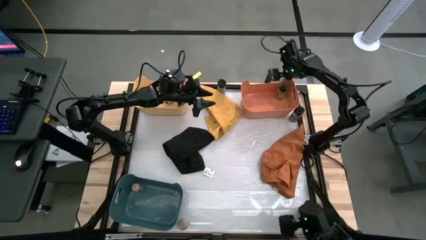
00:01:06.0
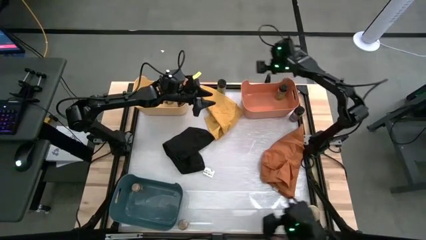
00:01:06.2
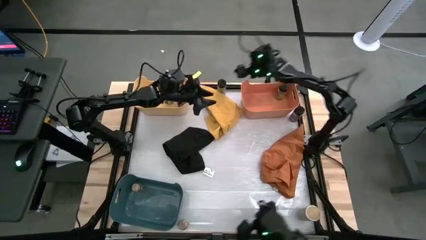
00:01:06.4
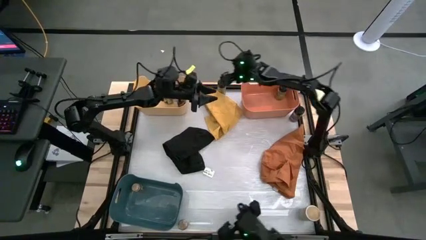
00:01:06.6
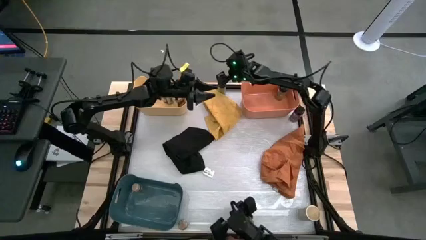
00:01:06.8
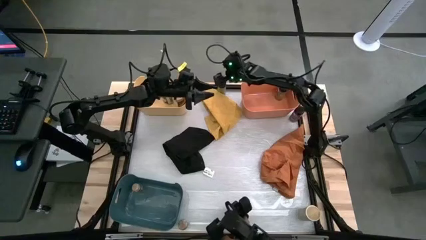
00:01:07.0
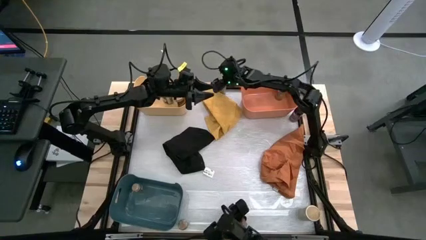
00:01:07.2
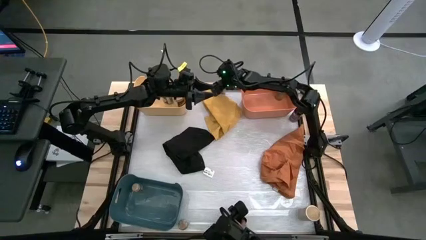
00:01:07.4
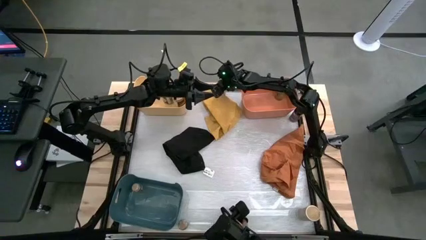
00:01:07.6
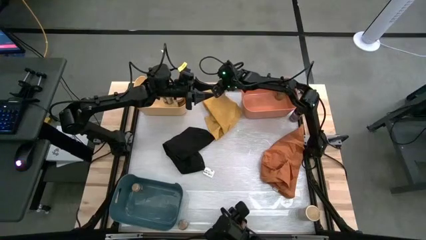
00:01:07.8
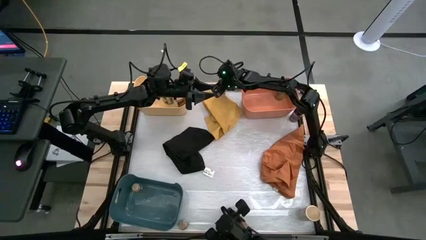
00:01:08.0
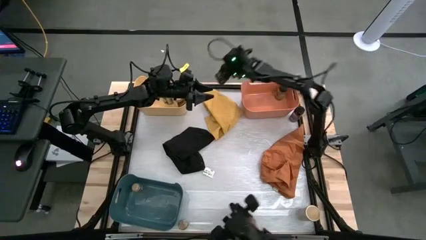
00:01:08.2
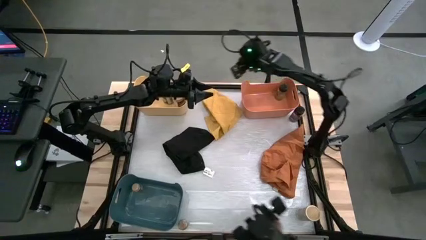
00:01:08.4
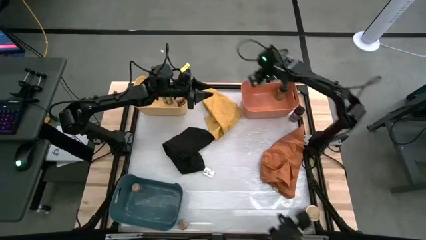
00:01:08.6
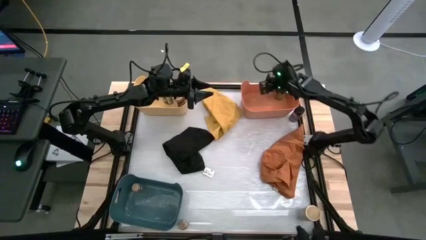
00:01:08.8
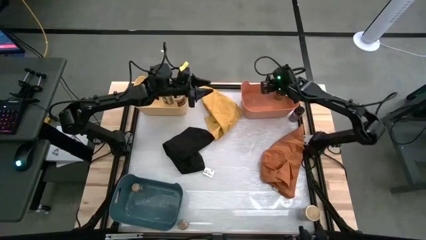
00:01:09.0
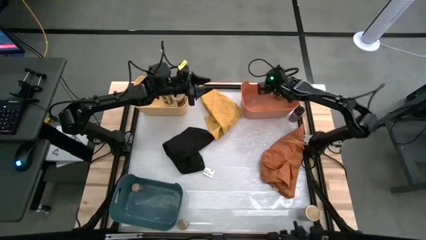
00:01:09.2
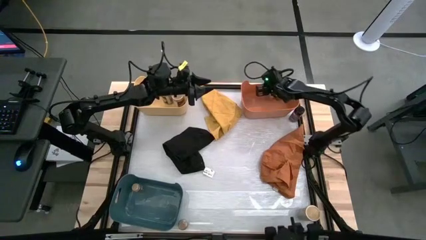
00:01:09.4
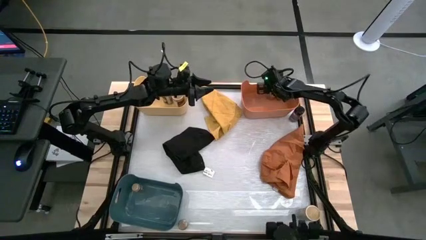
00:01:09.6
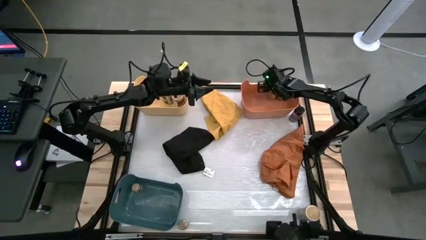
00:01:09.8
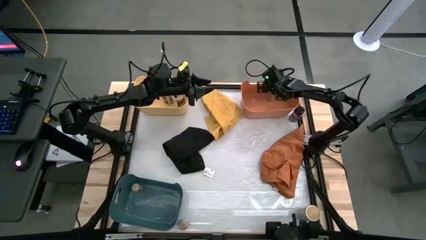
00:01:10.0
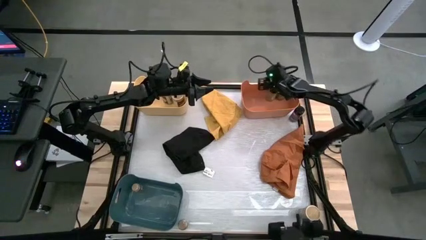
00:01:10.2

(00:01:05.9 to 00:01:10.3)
Task: Sort spices by type
Put the left black seasoning bottle into the orange bin

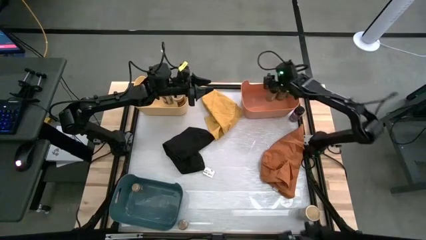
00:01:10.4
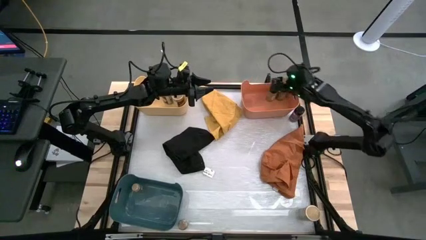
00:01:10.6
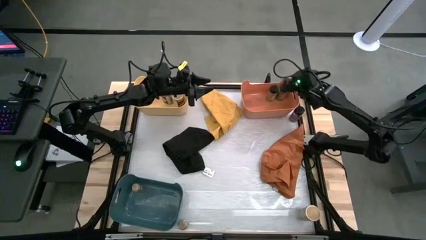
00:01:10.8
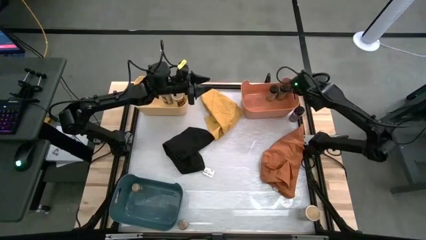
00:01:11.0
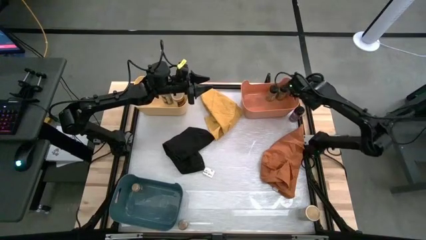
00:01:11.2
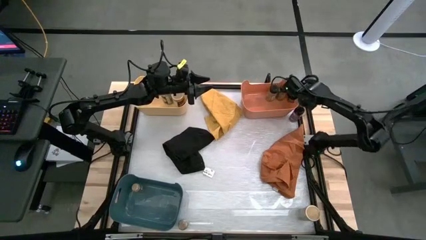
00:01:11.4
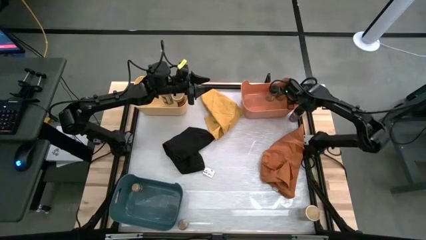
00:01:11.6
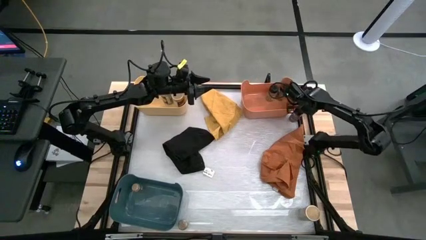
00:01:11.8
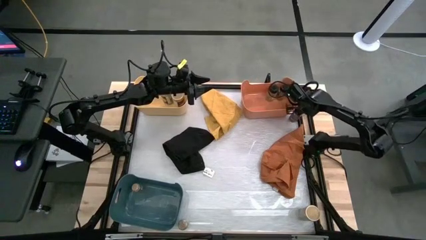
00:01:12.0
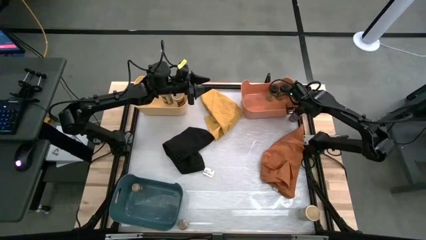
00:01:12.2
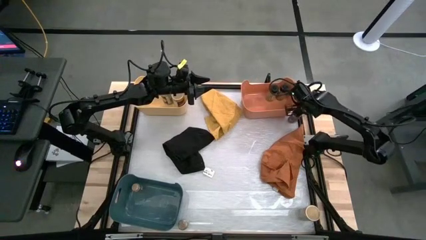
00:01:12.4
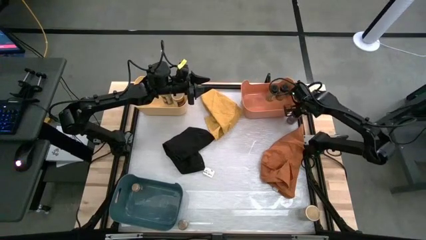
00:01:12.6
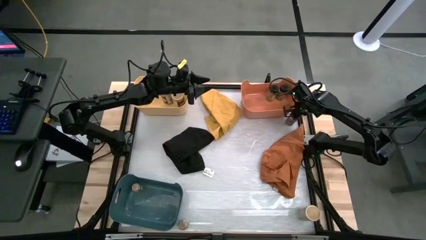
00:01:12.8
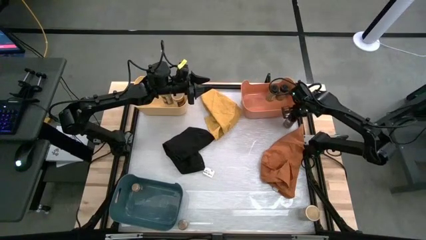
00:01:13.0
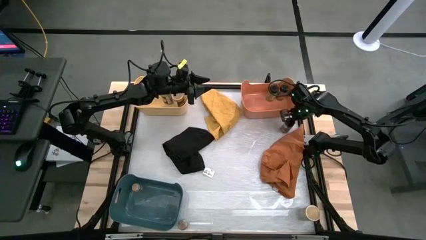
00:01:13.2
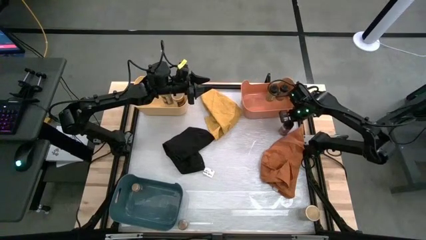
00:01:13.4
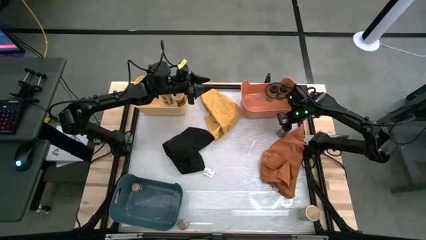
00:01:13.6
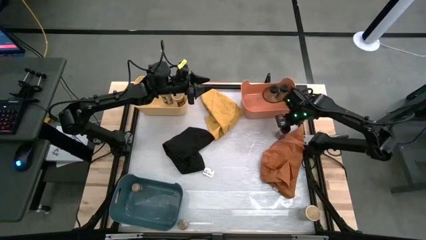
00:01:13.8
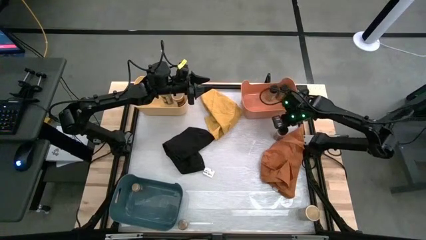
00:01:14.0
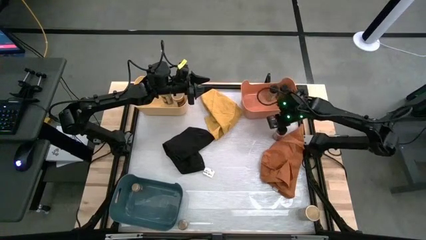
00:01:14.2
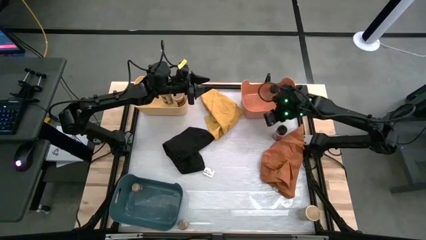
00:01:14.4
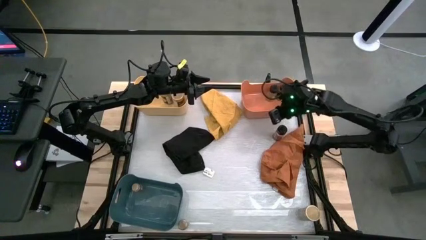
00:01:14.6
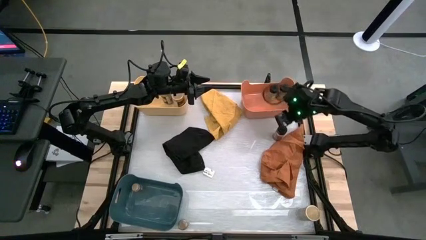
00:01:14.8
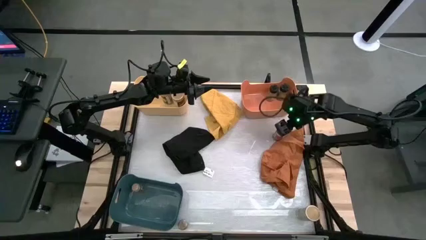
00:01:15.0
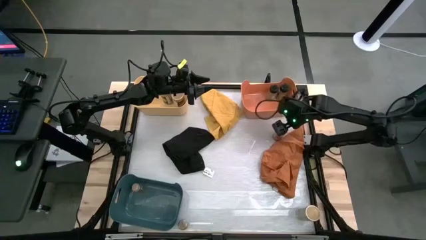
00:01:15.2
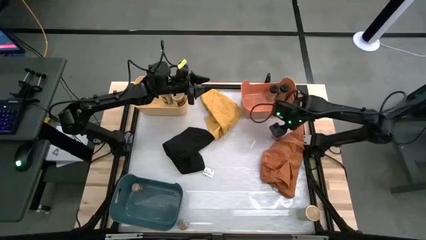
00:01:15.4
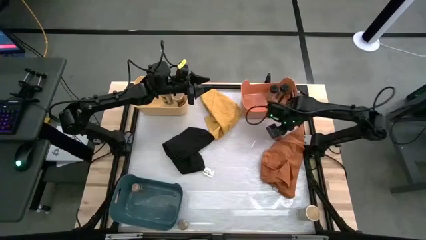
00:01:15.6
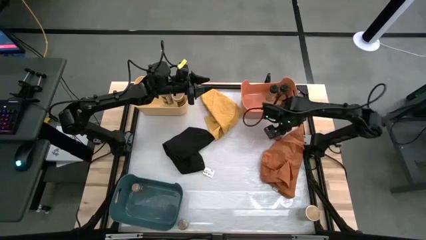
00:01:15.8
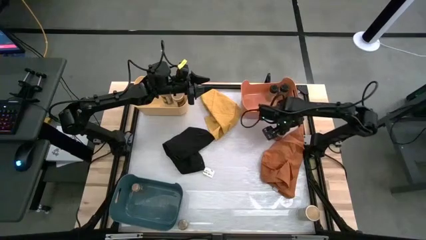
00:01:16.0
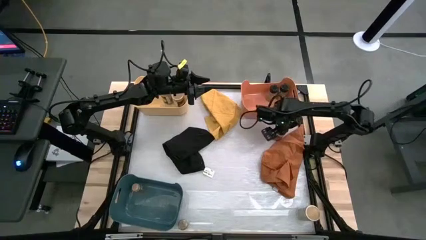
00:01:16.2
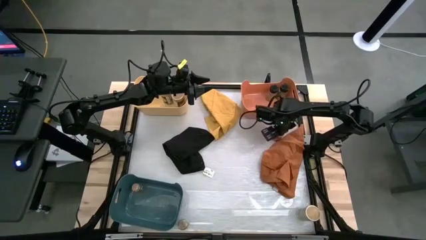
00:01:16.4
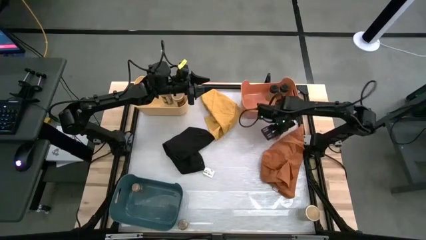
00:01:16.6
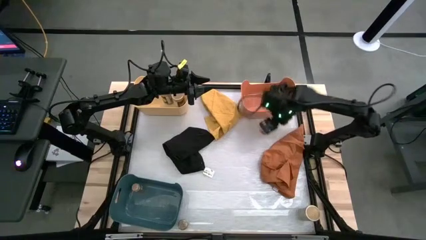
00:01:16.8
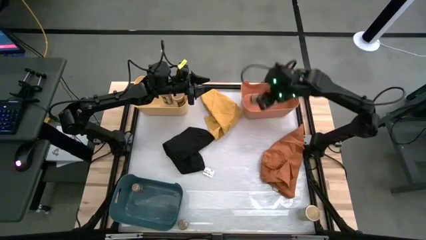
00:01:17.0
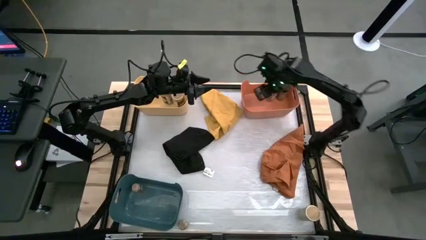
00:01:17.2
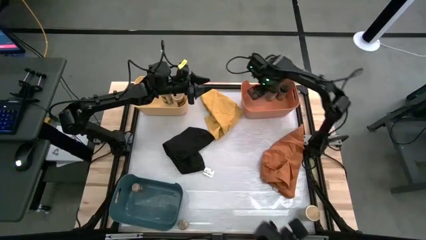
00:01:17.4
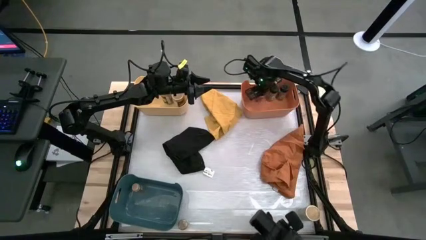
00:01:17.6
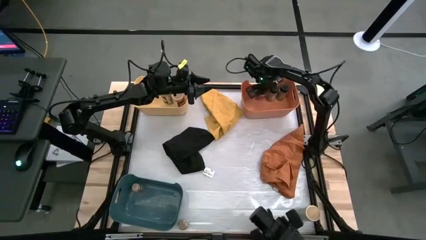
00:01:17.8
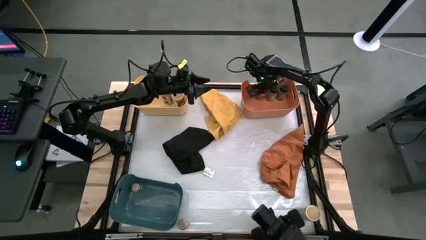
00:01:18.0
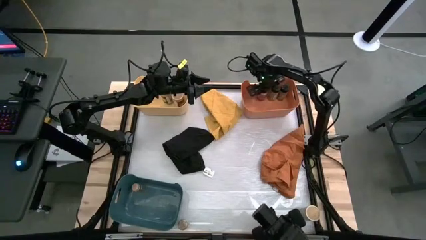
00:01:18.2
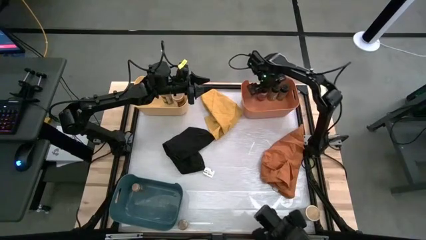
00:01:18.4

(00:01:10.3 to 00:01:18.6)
Put the black seasoning bottle into the orange bin

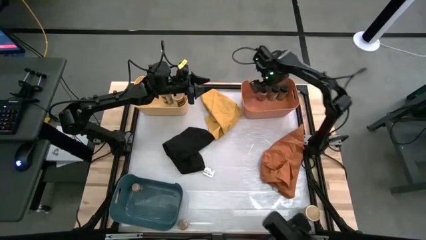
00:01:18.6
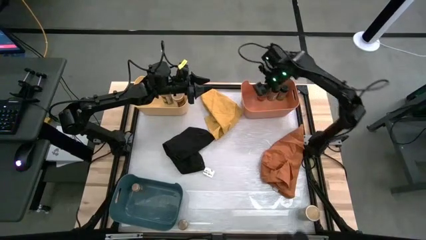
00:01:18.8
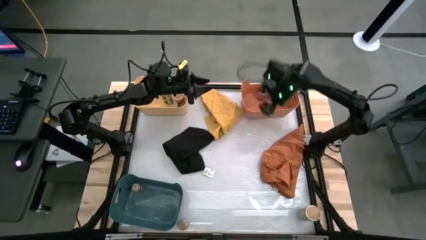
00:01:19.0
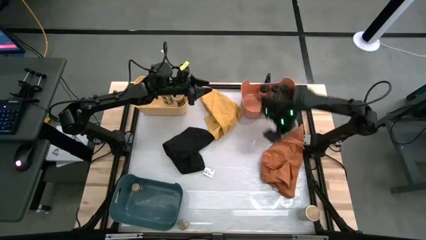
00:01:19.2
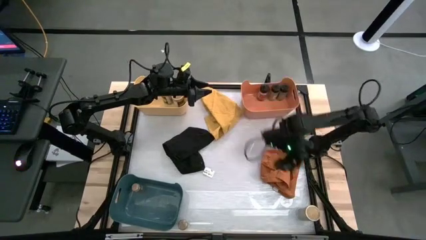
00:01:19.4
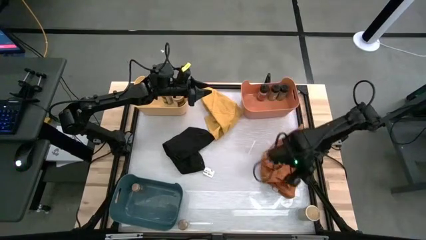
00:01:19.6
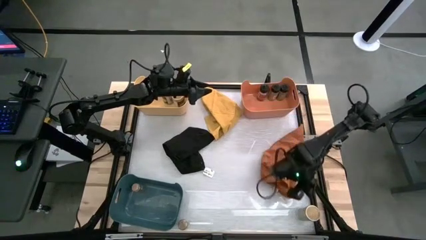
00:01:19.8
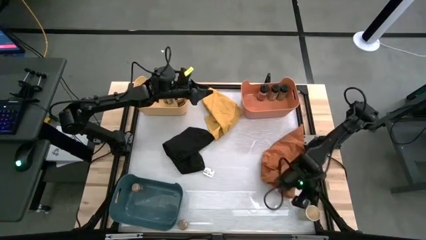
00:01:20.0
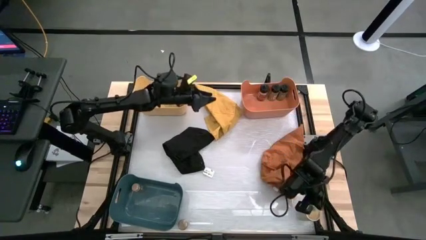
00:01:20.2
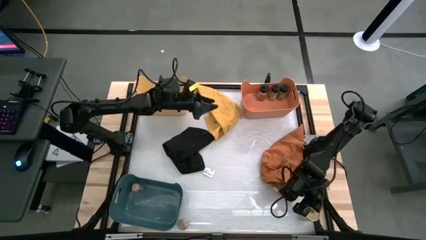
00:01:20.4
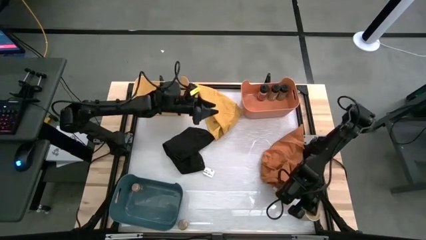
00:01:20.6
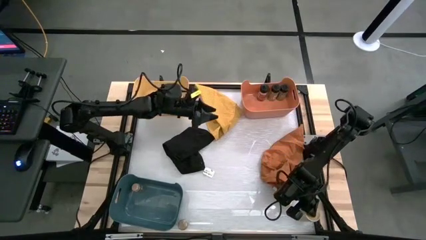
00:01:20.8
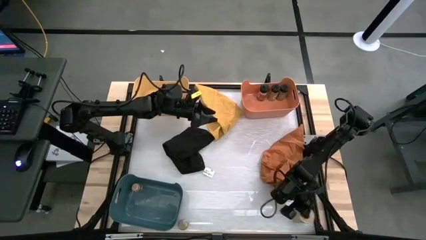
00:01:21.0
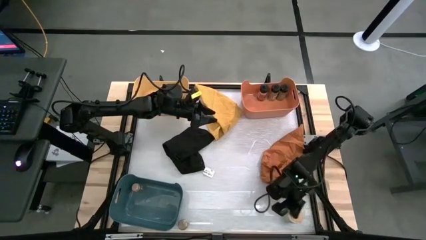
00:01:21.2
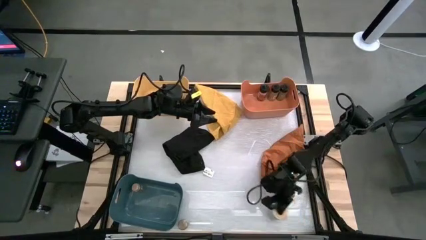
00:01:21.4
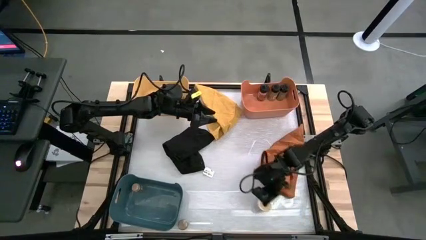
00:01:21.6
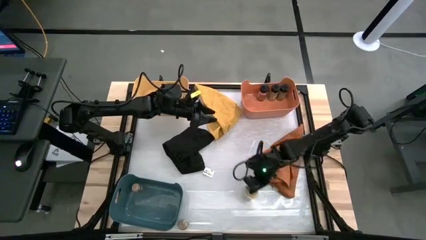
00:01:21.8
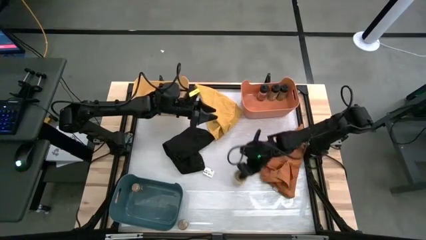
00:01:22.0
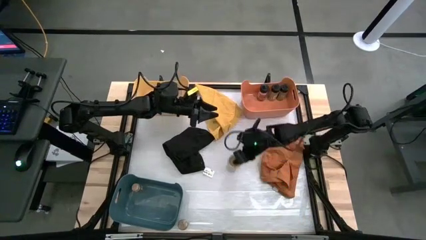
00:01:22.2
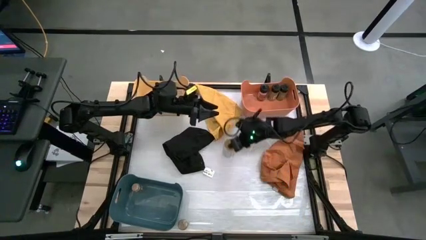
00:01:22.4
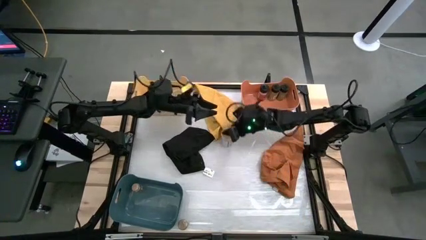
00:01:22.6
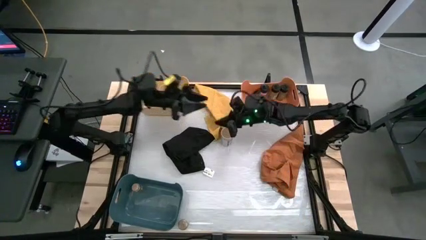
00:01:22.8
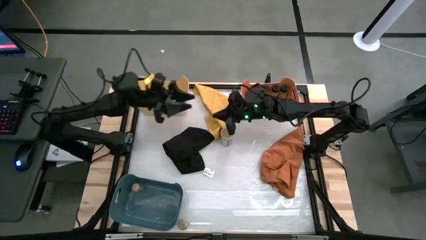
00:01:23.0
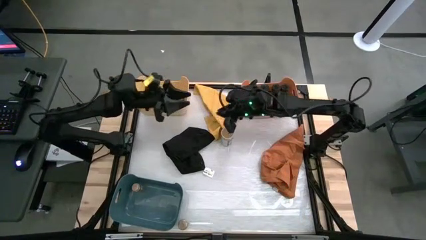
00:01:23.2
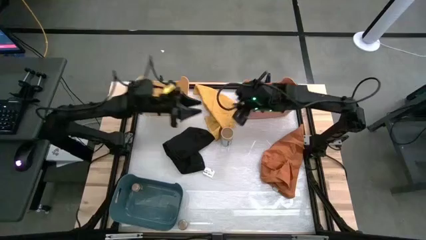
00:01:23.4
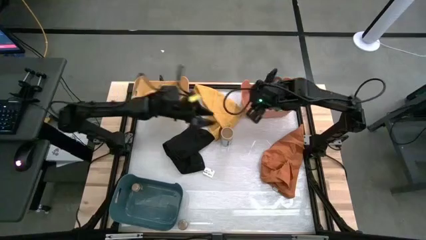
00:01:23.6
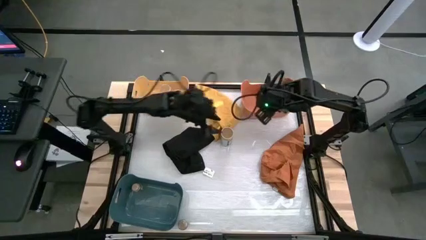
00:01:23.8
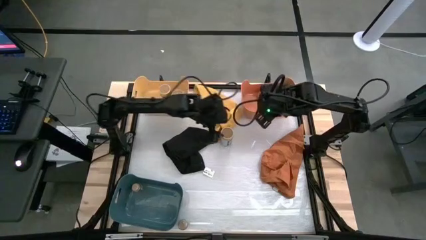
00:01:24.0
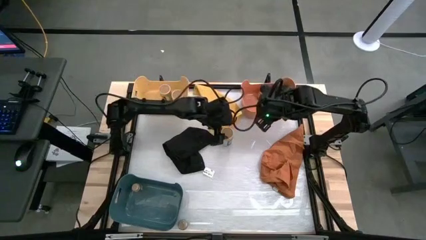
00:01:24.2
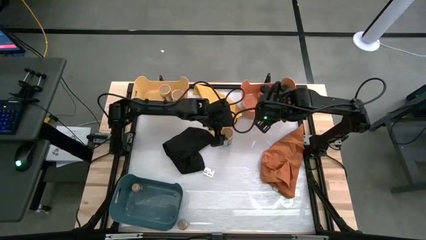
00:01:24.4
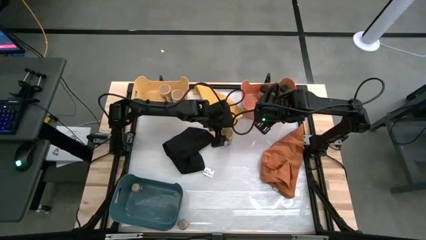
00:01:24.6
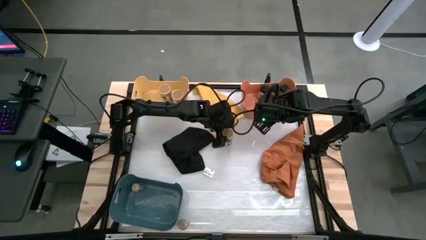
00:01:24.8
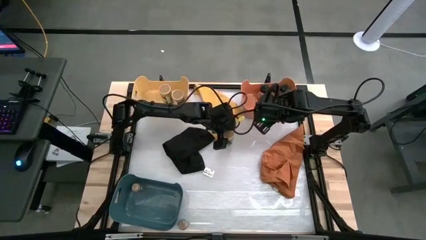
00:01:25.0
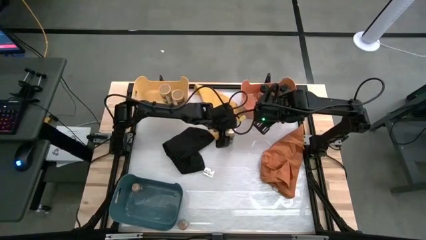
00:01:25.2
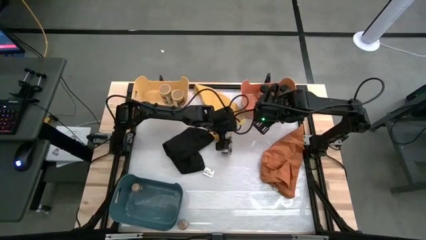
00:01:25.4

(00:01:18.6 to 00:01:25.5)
Put the gold seasoning bottle into the yellow bin
